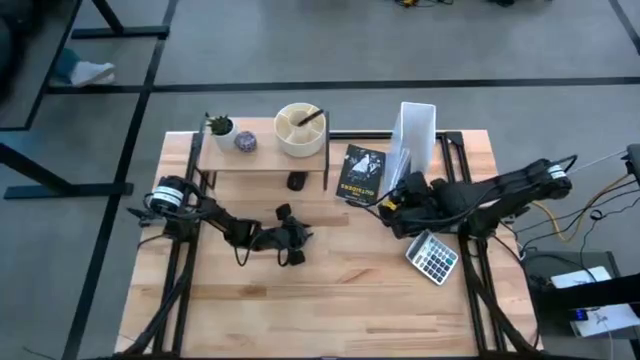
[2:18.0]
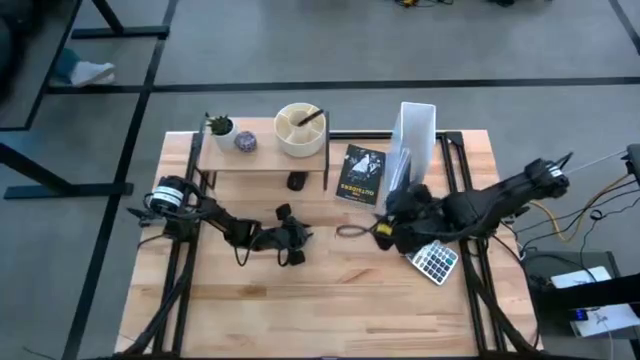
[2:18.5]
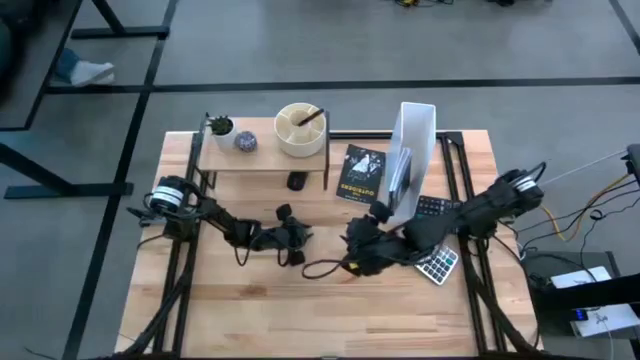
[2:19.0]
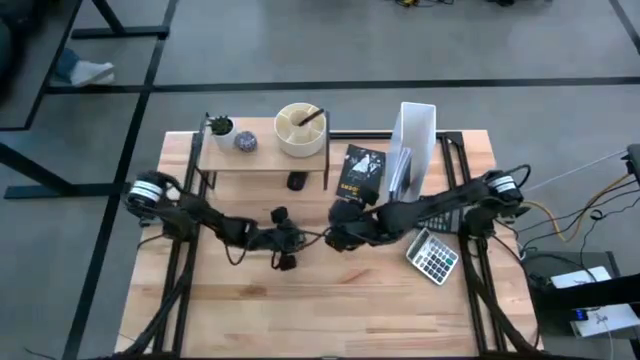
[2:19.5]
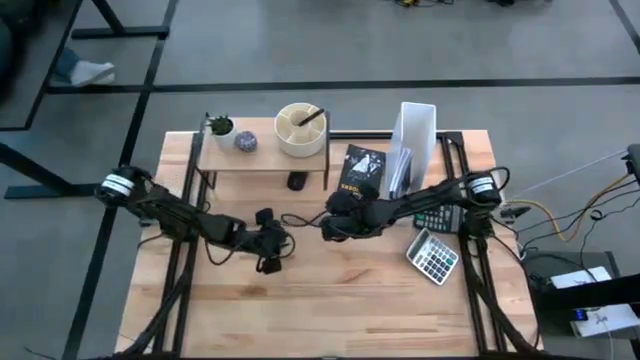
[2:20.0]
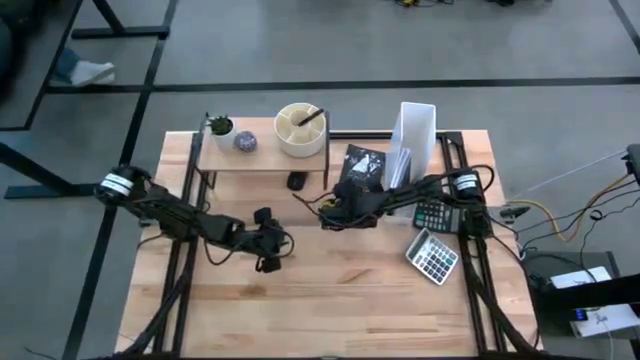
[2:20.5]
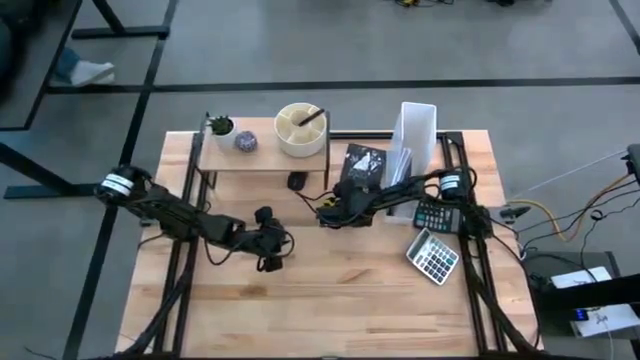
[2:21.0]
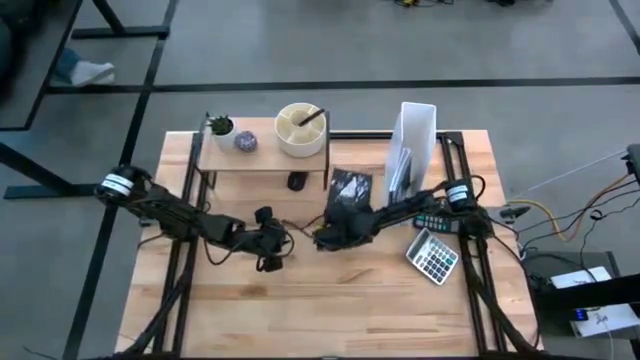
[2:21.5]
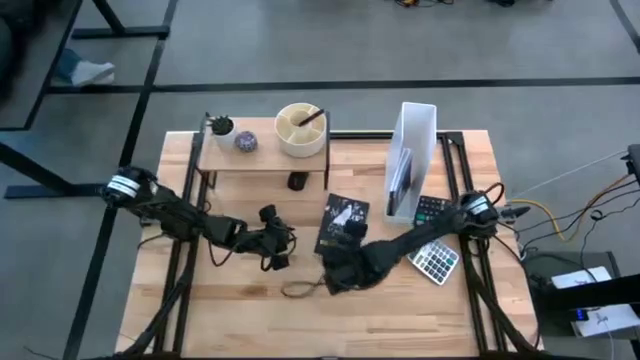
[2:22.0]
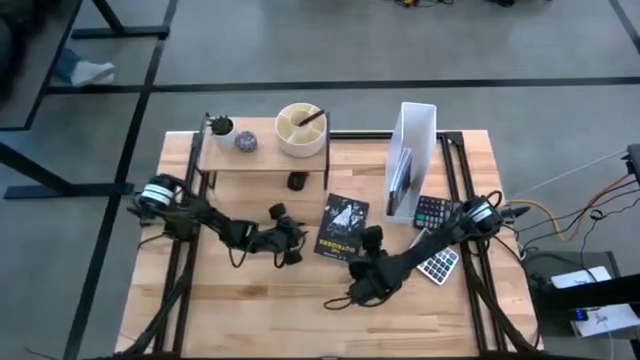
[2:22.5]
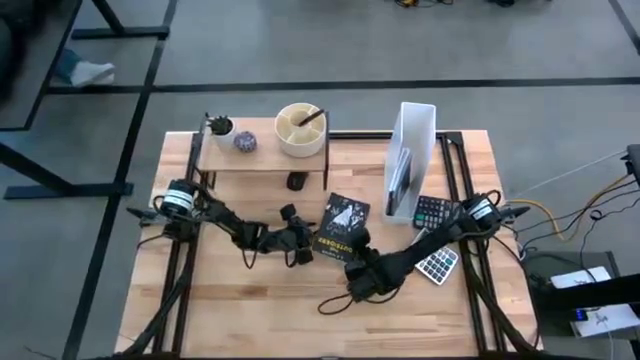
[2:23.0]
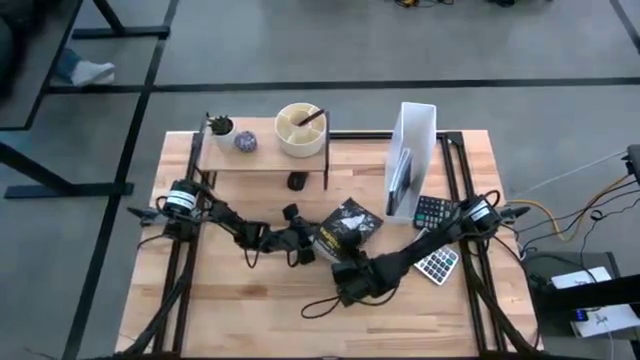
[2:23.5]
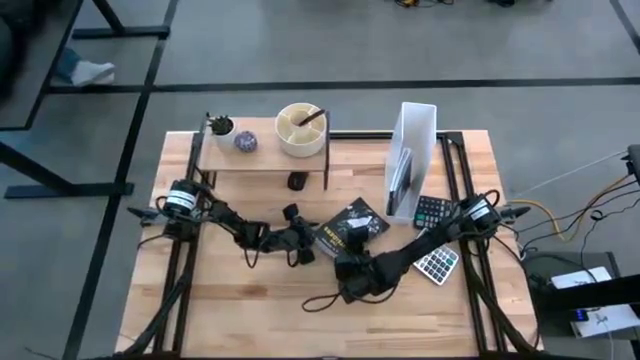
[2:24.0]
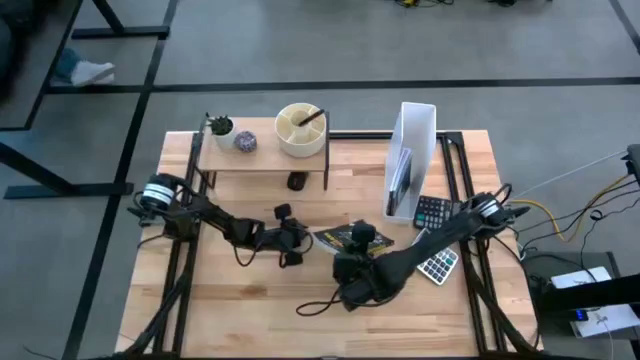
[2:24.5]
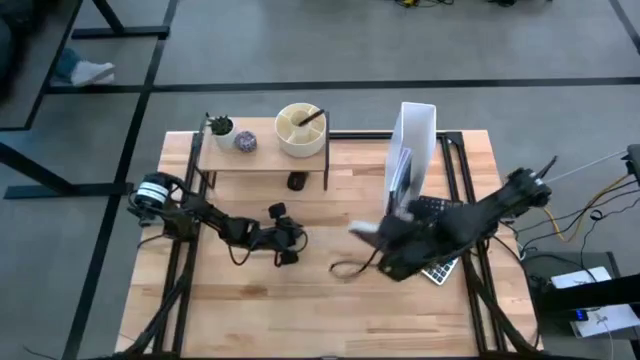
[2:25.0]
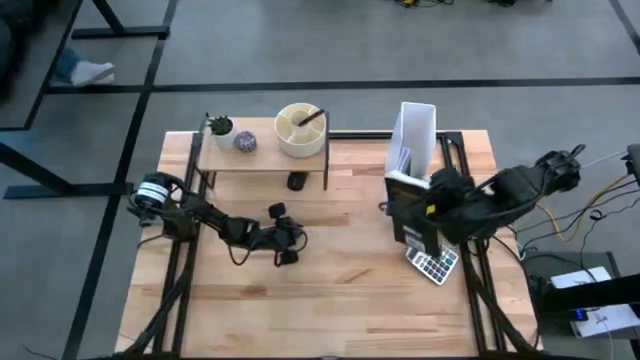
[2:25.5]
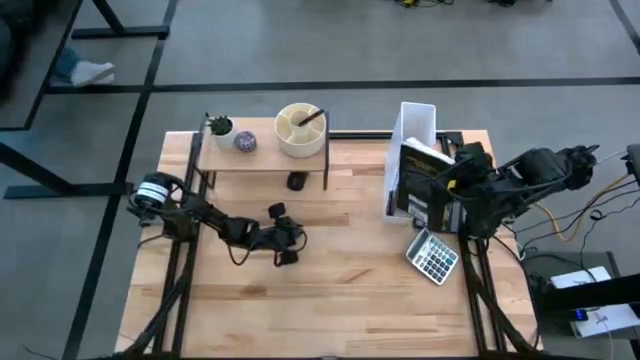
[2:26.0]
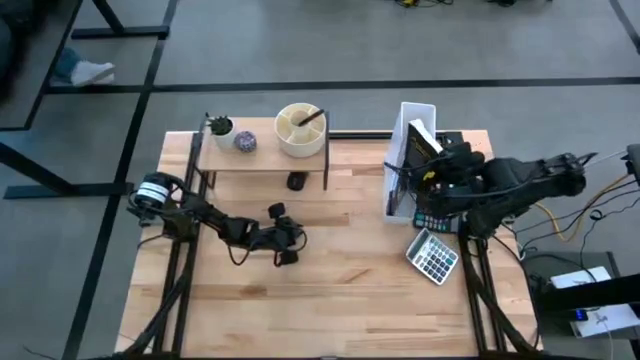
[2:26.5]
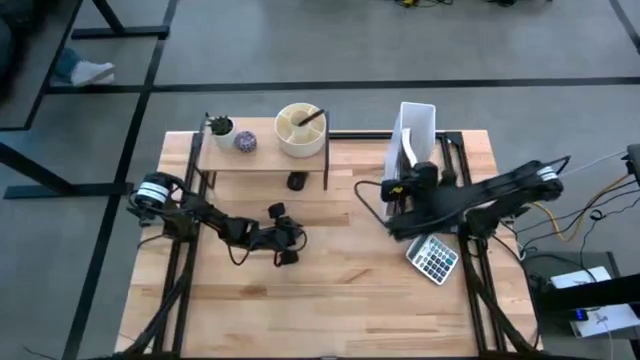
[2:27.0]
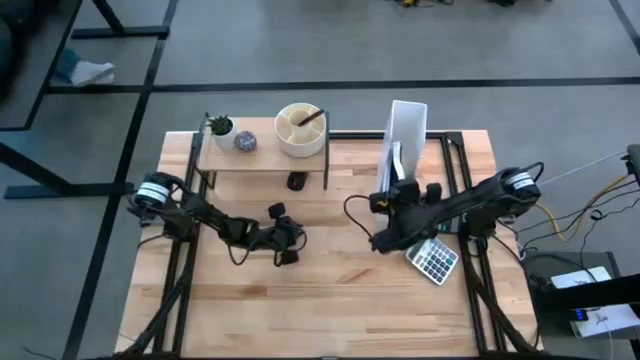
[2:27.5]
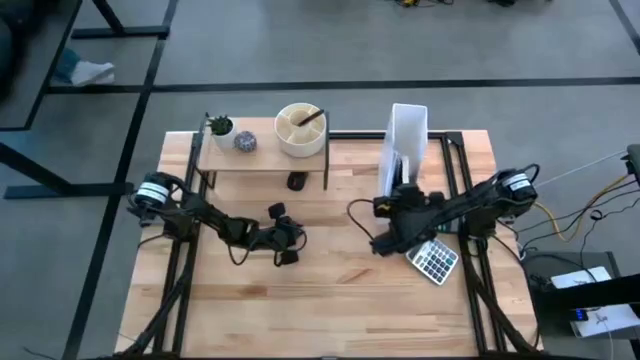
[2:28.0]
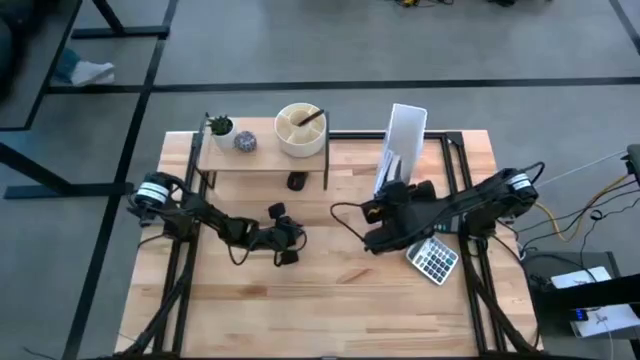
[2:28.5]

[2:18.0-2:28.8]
Task: Stock shelves
Put the black book into the white file holder

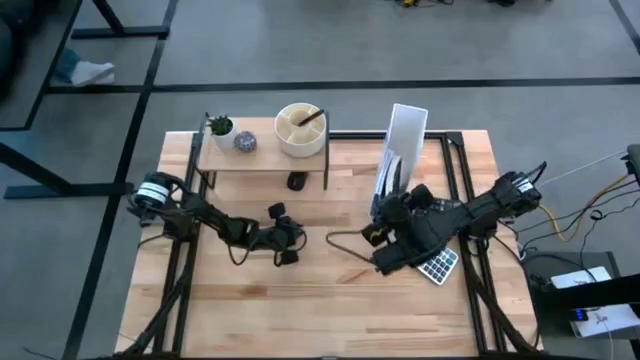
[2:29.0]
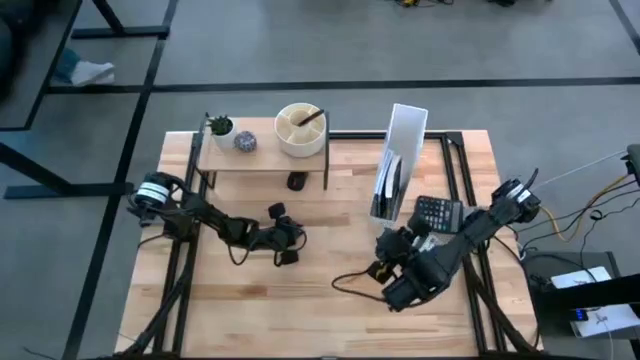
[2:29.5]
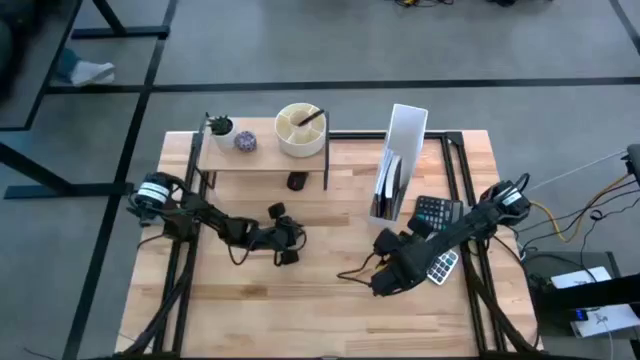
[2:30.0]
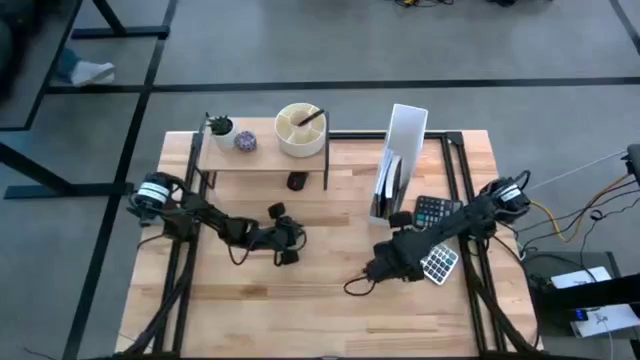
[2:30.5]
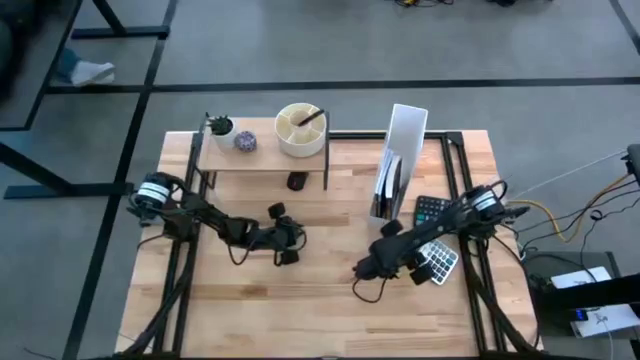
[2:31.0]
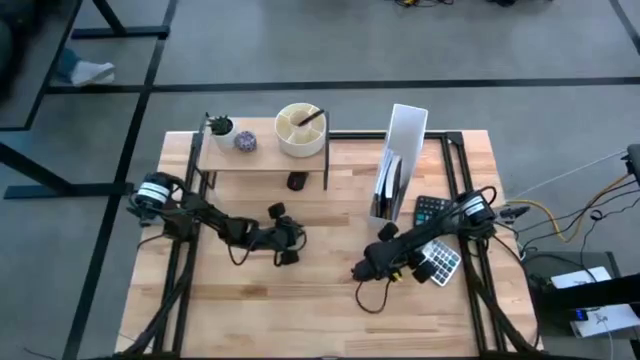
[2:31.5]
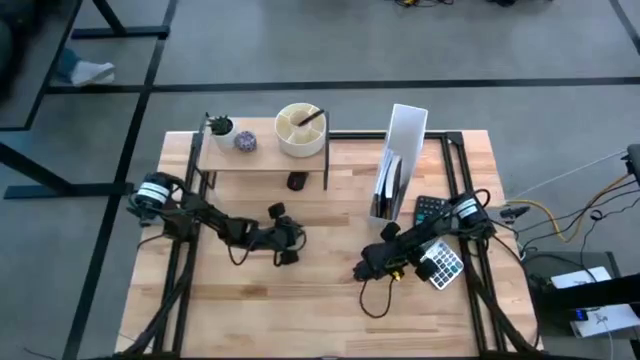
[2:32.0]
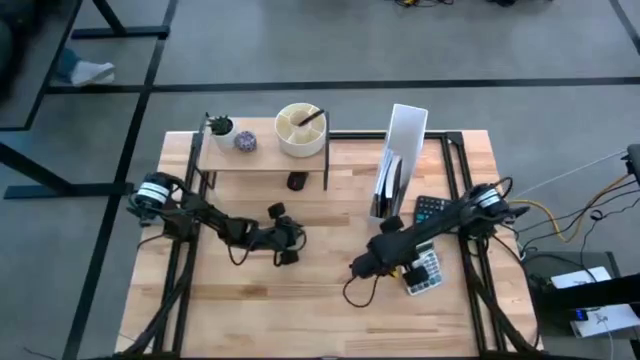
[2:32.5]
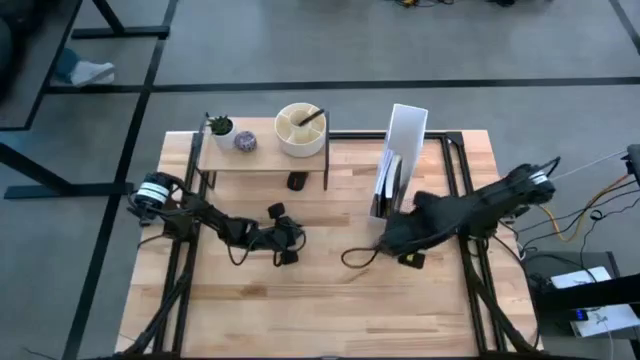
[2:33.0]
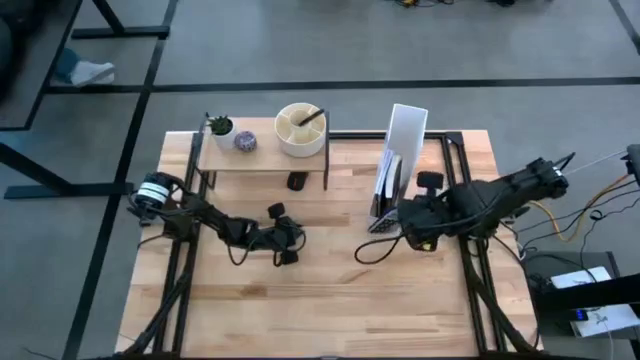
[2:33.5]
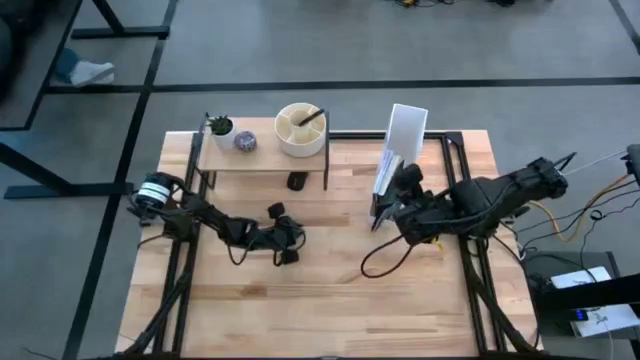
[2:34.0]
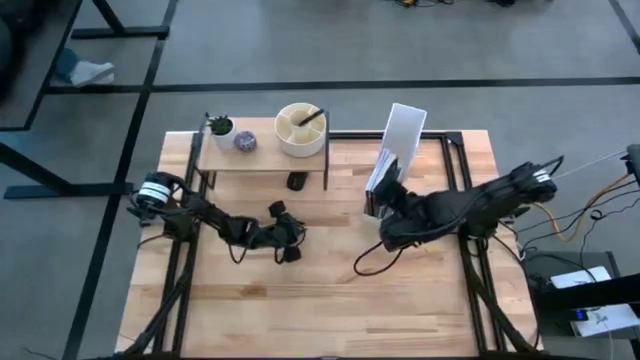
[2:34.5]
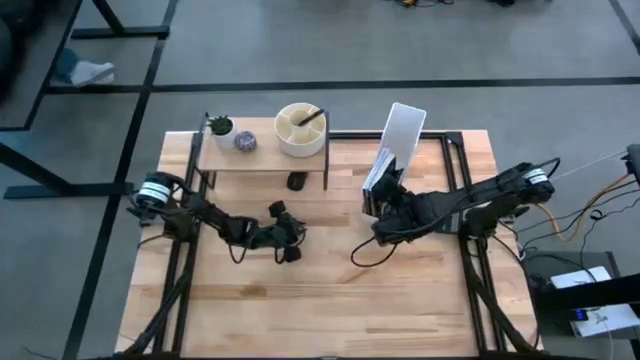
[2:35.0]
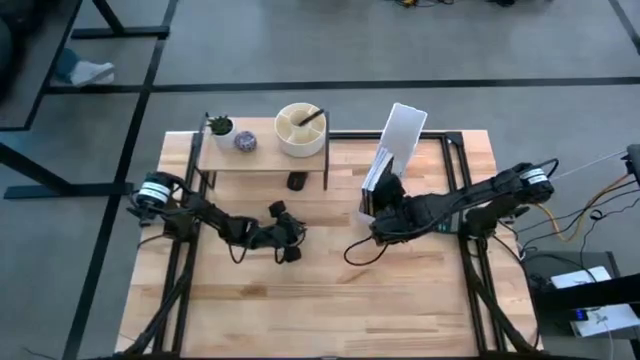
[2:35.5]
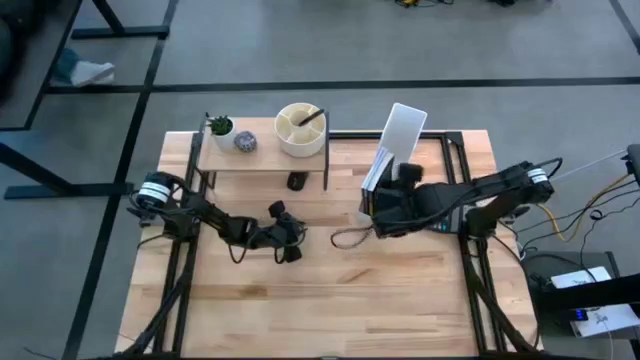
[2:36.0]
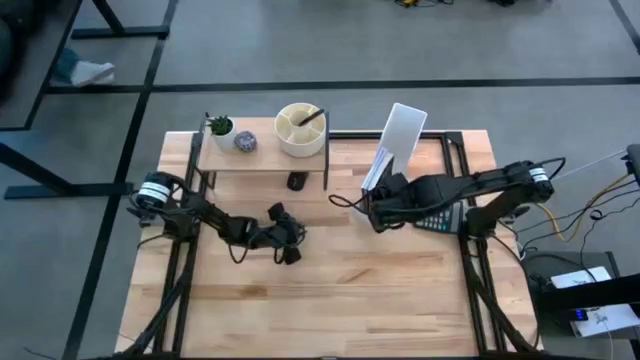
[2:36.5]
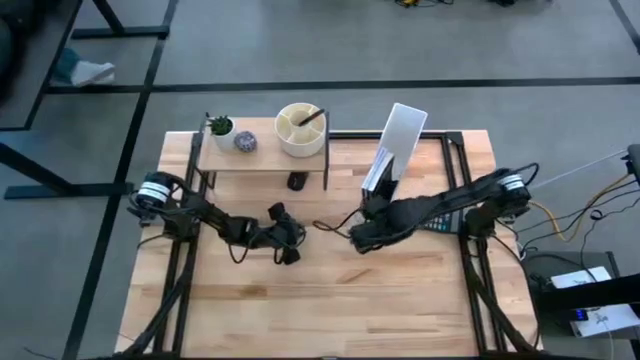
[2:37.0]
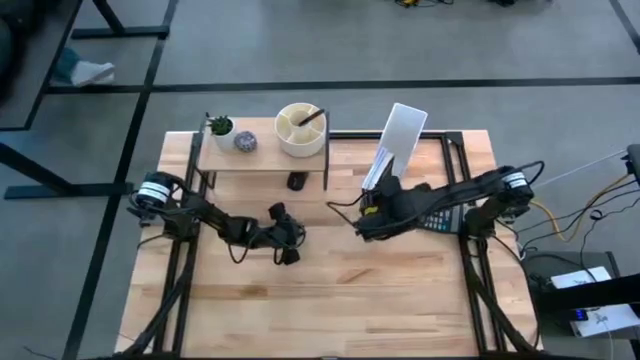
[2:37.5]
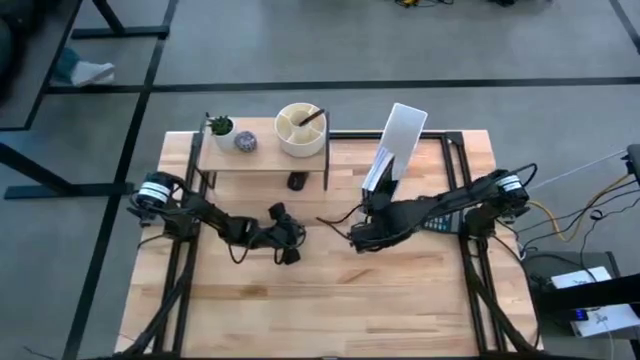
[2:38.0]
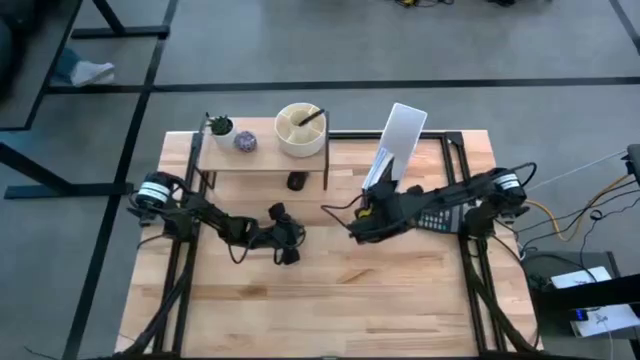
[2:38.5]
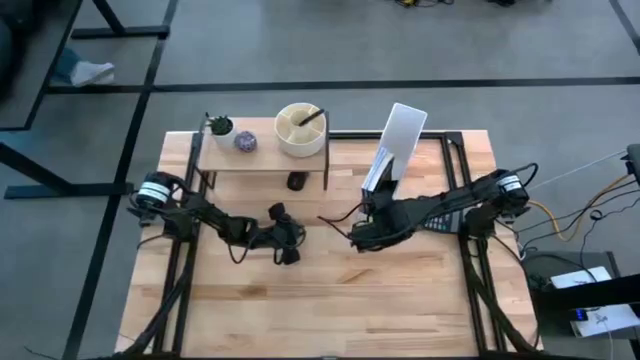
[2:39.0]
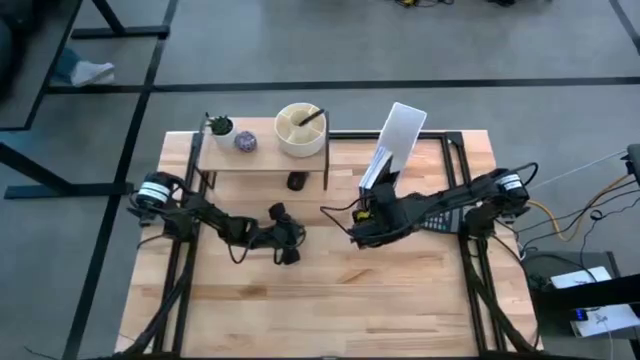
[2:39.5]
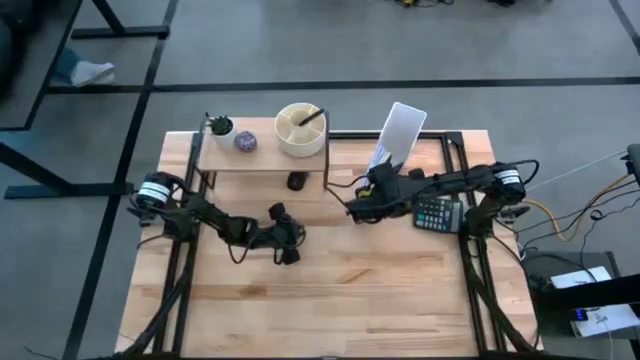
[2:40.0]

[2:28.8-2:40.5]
Put the white calculator into the white file holder
